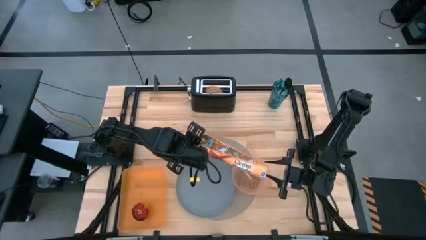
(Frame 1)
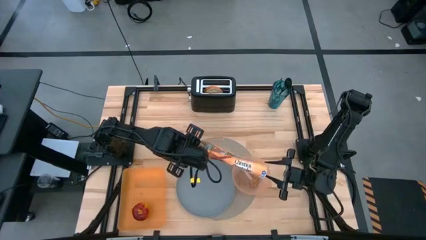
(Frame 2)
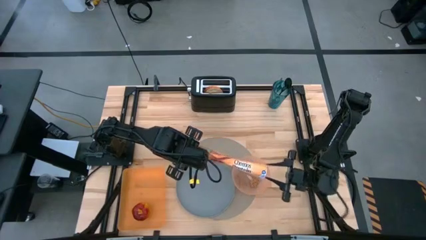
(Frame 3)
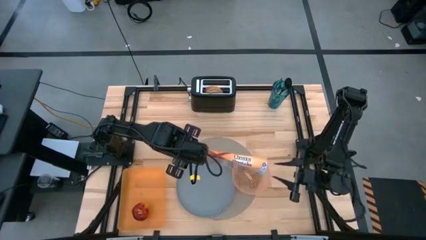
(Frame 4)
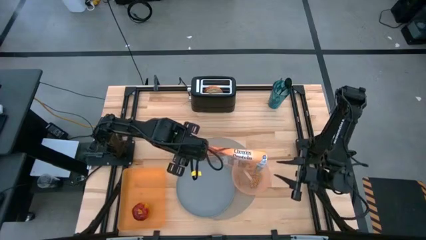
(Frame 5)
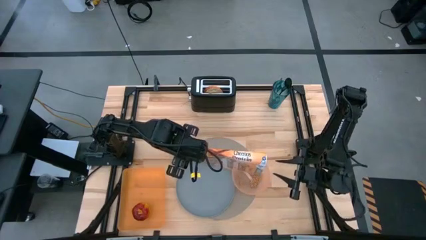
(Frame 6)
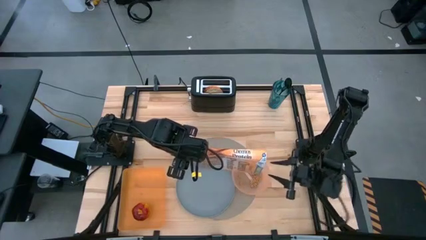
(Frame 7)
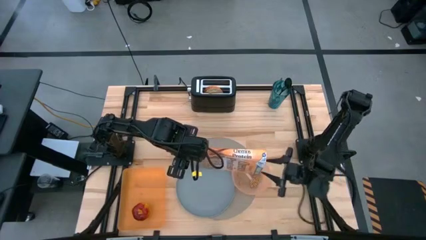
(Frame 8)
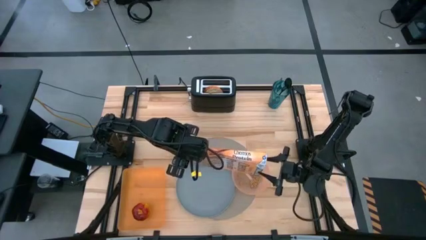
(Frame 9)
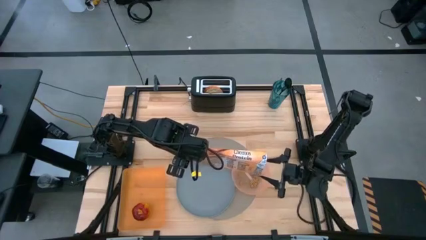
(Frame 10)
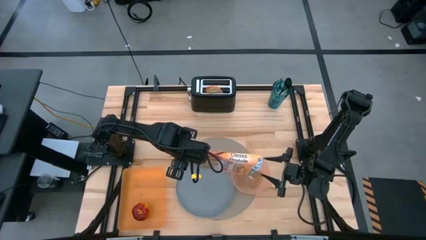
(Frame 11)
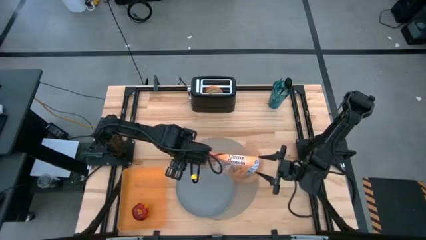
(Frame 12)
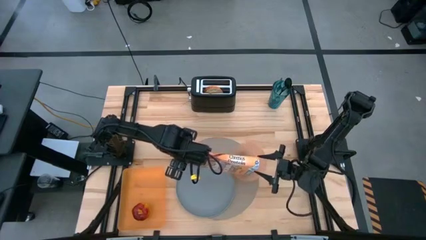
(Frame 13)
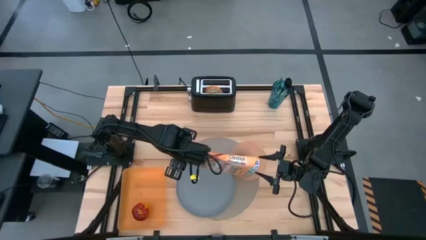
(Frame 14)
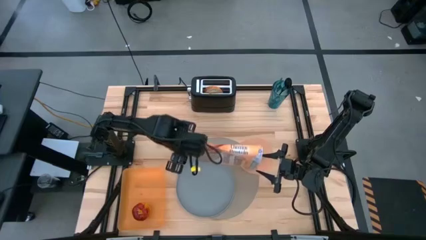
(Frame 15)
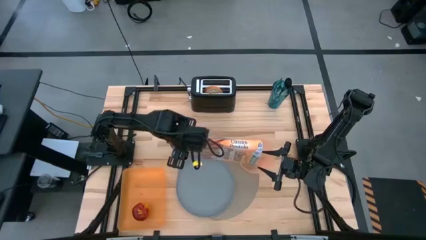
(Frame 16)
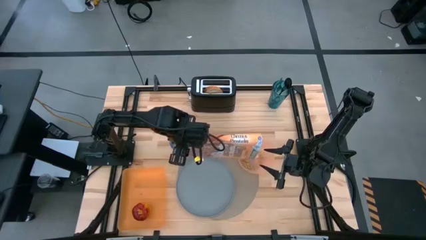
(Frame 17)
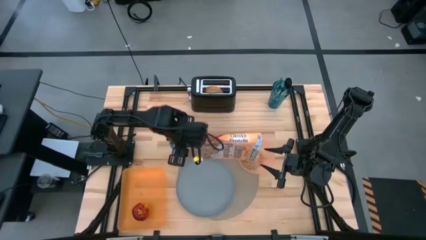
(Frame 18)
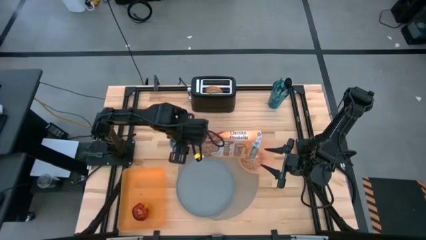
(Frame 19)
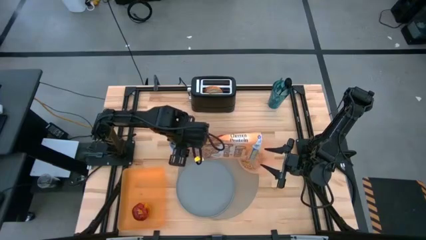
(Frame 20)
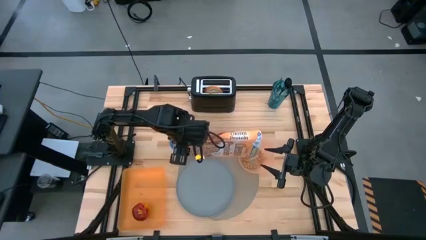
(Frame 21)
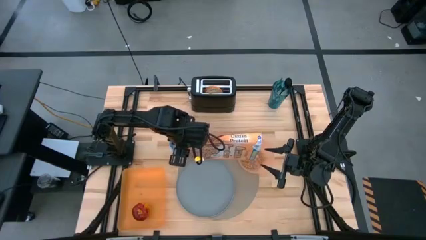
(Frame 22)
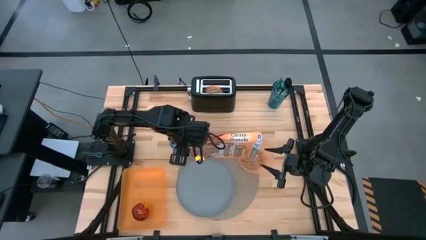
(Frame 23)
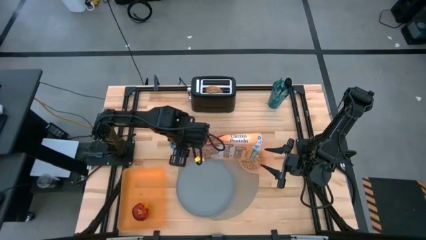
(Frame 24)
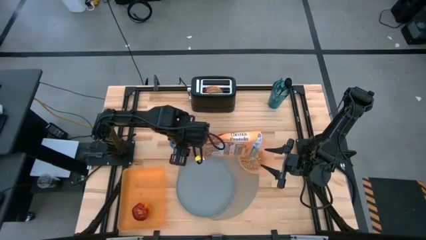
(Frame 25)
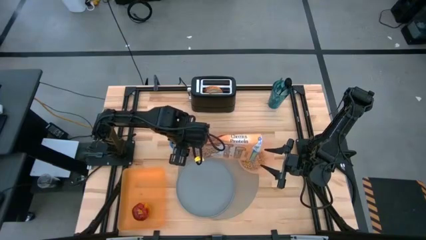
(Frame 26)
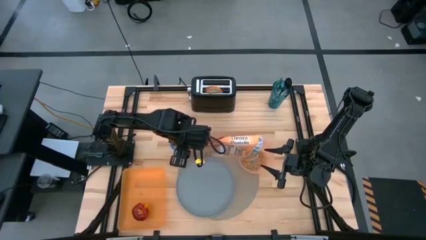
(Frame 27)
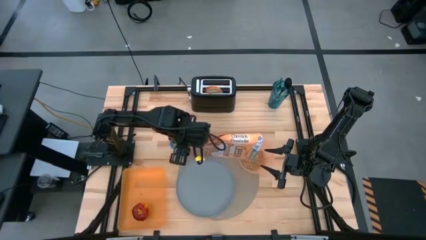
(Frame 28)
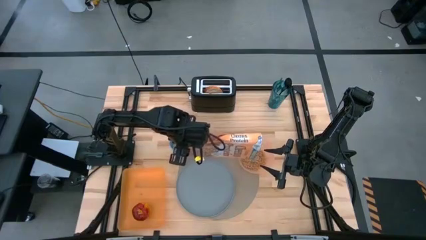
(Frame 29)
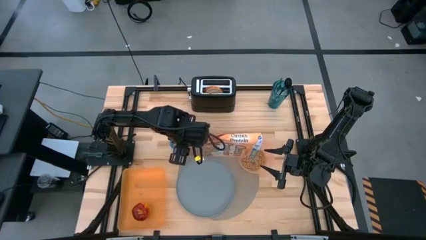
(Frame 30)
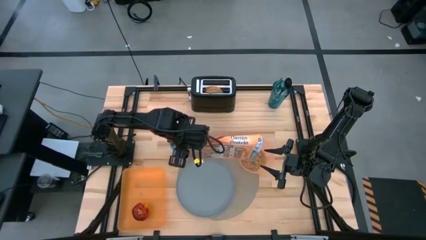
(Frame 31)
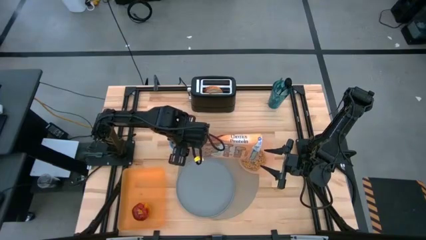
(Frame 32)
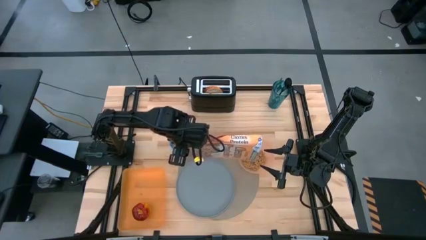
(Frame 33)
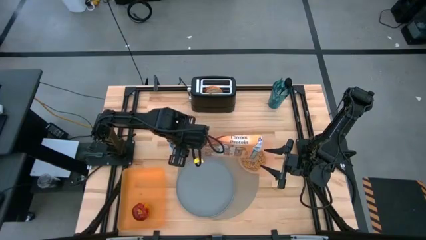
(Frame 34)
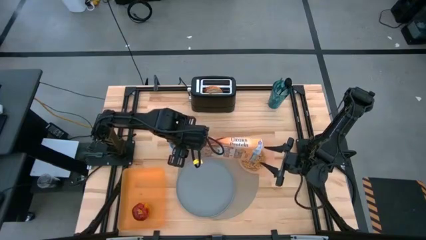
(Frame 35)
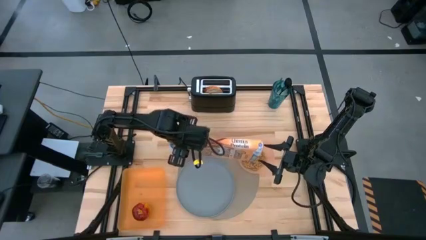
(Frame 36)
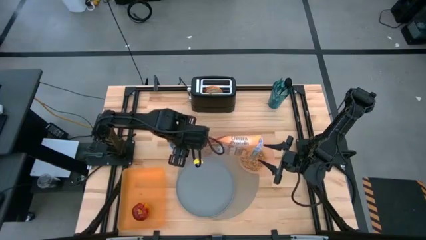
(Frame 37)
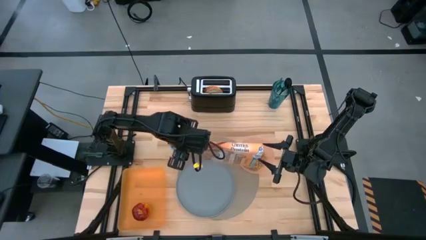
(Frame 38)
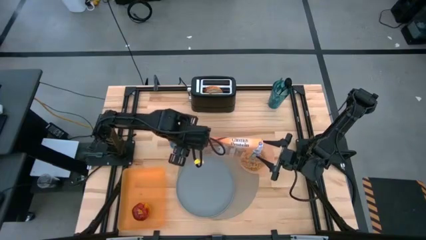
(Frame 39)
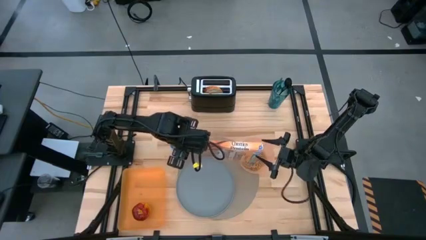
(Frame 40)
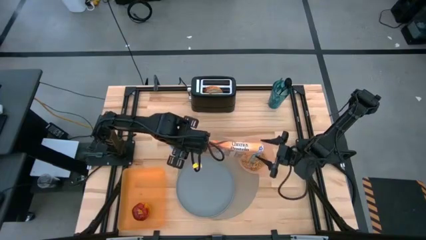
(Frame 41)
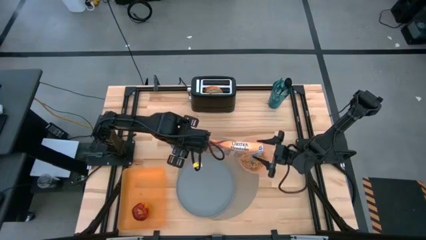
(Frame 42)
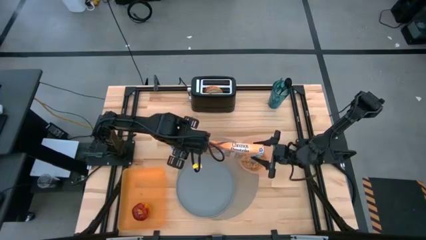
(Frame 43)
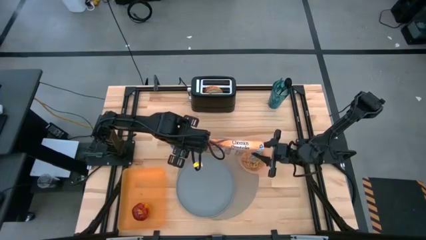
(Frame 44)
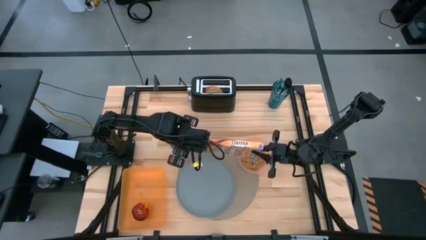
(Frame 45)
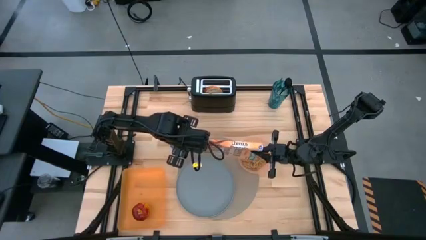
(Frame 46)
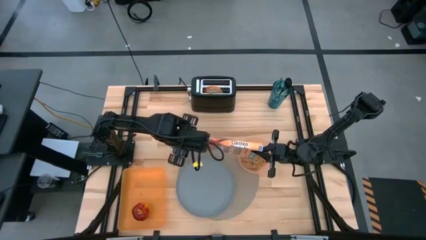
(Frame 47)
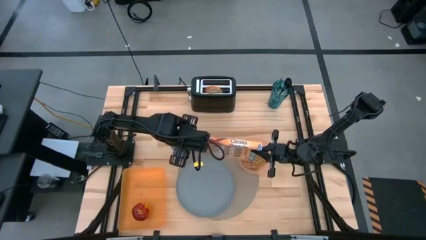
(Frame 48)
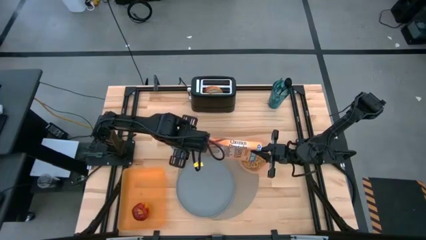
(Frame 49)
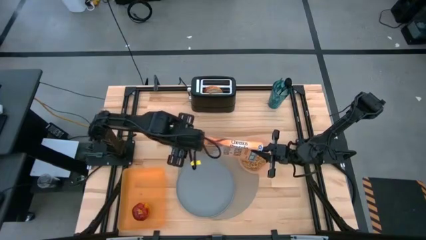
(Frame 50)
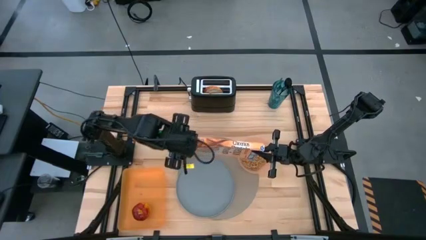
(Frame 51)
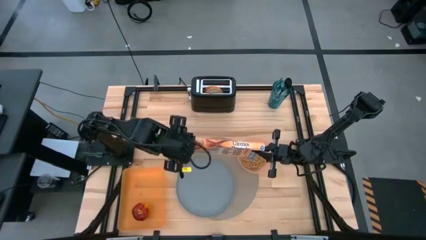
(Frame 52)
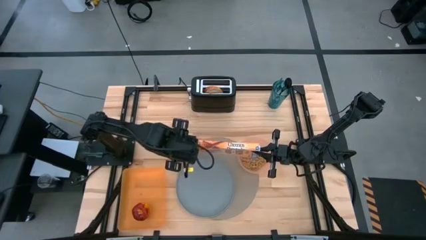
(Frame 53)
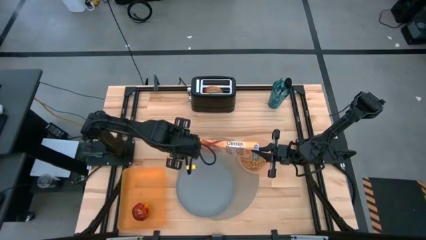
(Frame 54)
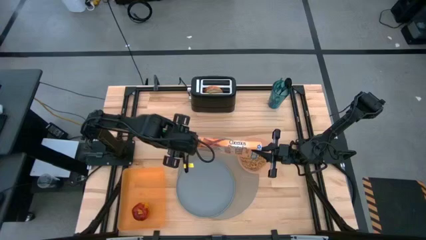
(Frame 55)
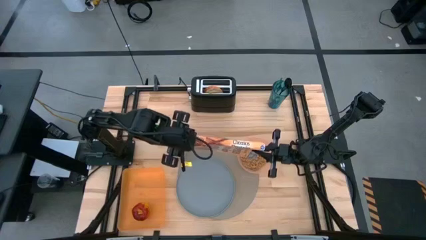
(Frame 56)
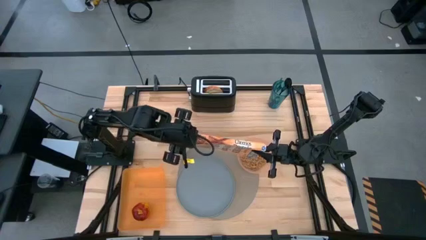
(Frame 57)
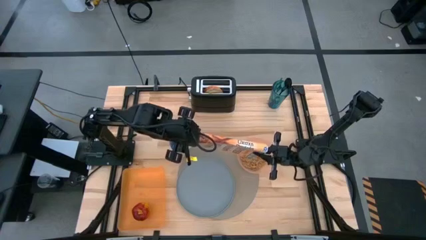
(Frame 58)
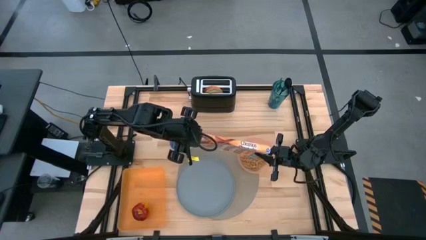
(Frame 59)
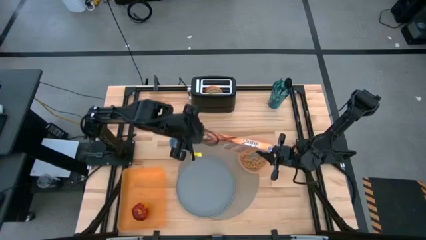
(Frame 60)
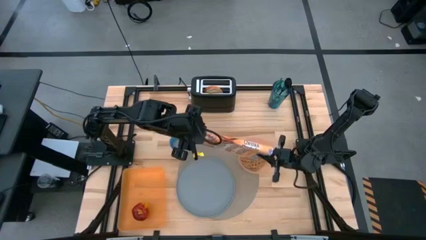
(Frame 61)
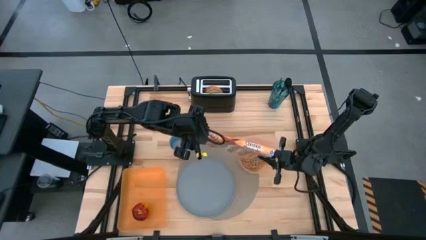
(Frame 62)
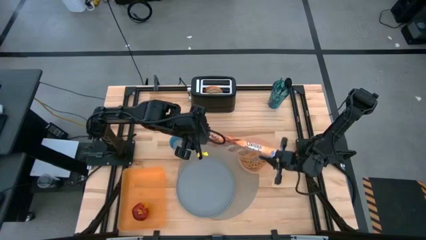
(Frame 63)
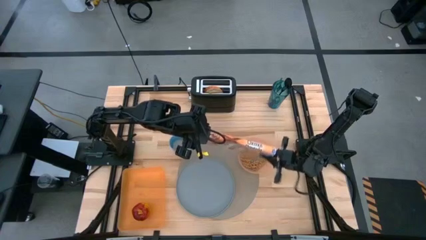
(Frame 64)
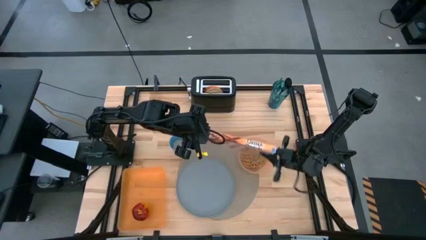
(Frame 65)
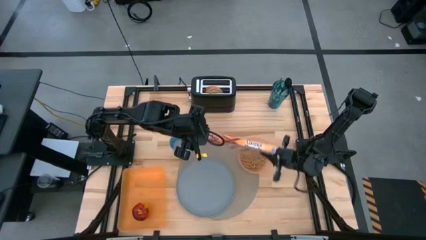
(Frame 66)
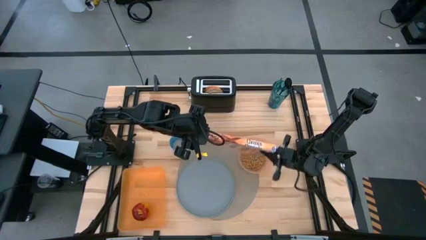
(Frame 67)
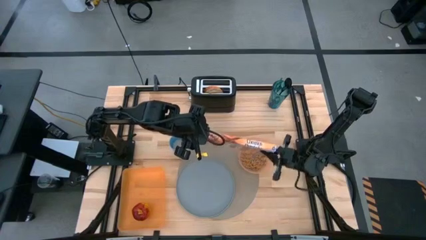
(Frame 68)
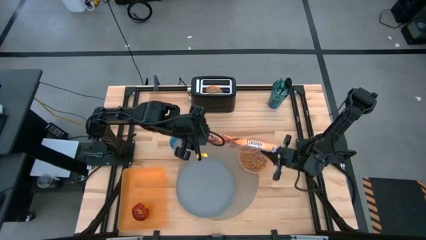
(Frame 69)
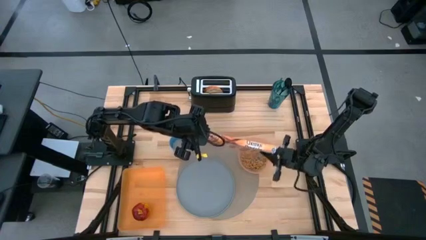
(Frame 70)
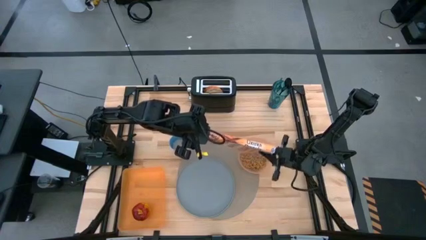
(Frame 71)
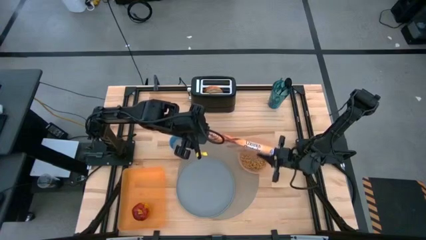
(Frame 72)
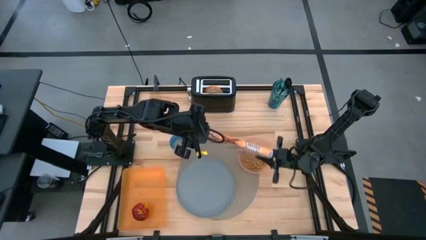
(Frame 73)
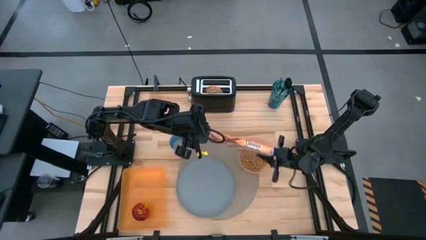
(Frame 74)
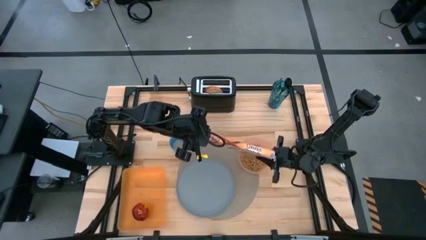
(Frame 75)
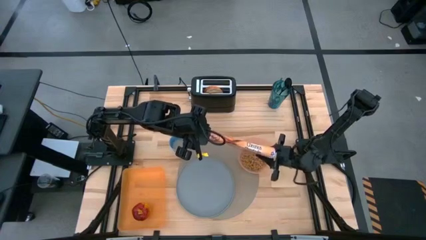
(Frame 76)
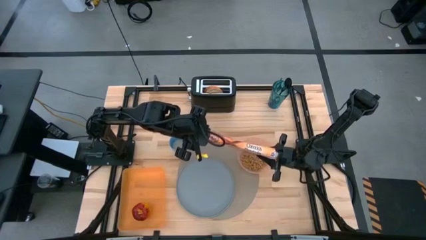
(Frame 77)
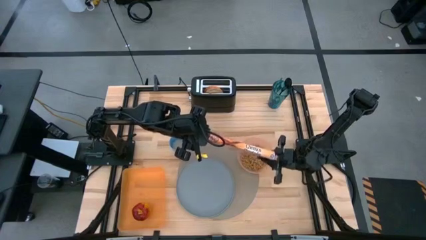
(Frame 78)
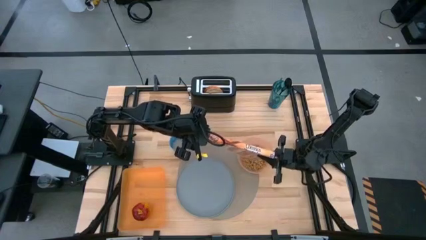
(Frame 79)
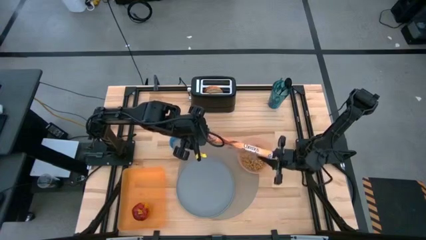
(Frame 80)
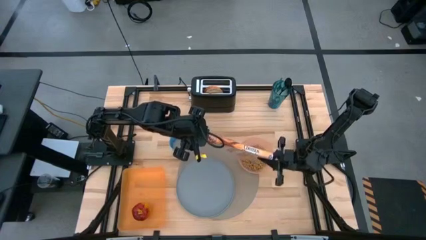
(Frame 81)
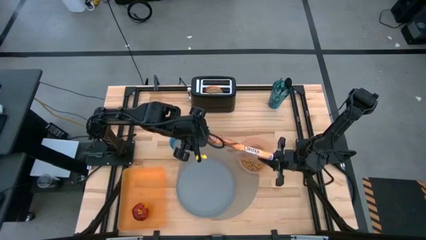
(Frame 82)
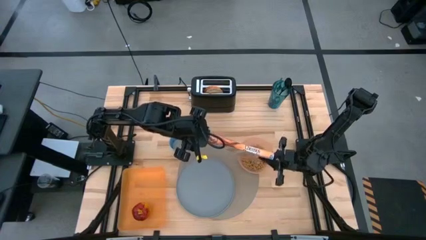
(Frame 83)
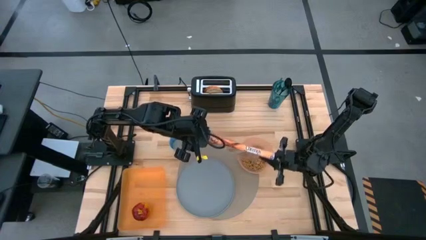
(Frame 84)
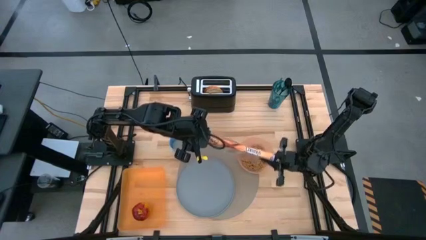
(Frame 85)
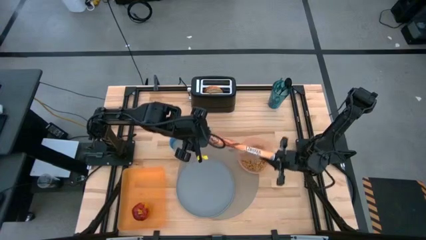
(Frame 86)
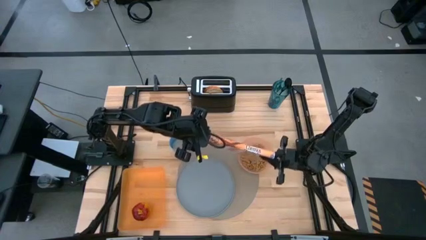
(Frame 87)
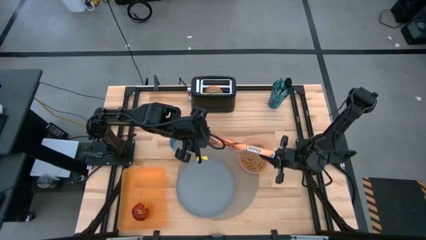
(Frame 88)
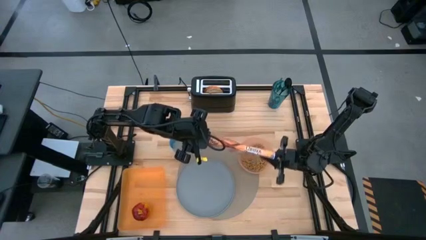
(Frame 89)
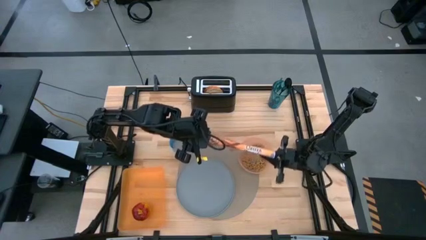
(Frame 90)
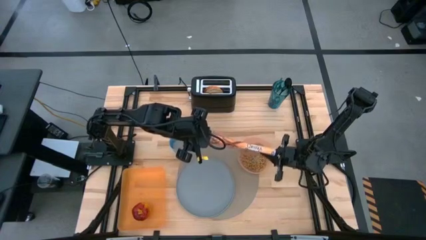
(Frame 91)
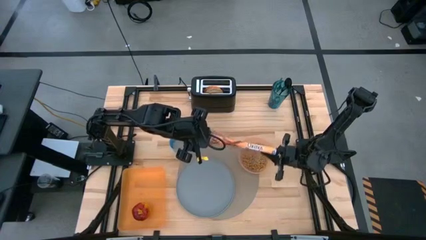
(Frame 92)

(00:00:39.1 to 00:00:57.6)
Task: Arrange a breakfast setting
Pour the cereal from the yellow cereal box into the orange bowl
